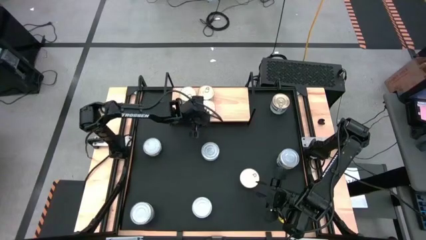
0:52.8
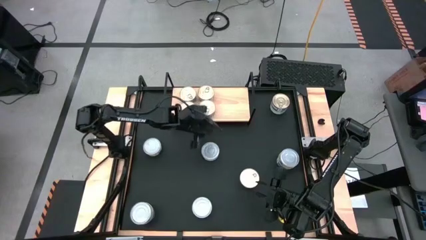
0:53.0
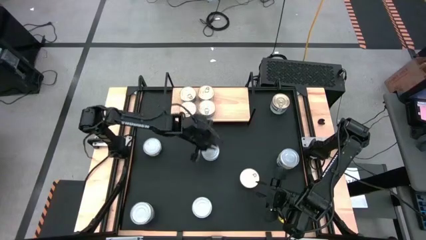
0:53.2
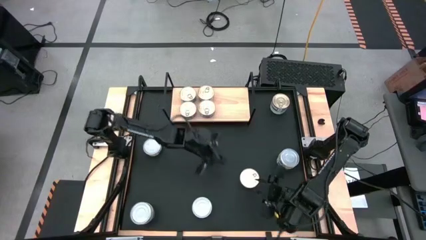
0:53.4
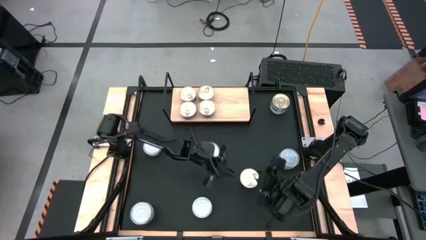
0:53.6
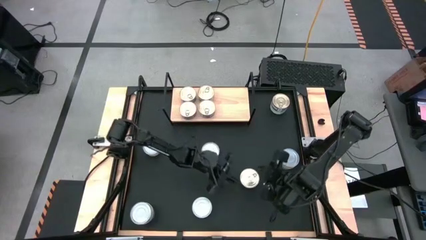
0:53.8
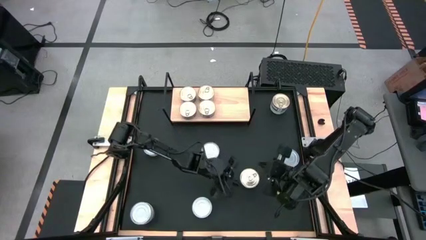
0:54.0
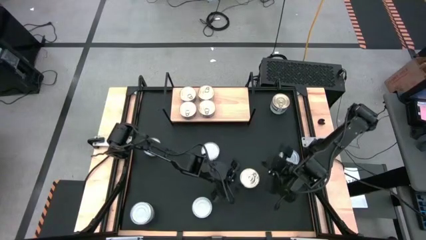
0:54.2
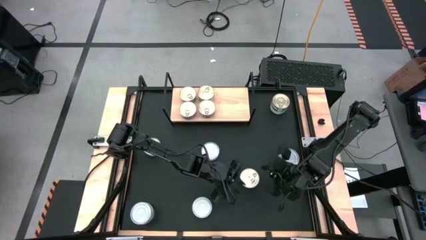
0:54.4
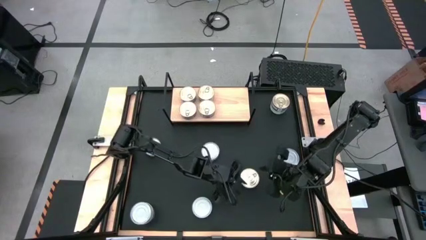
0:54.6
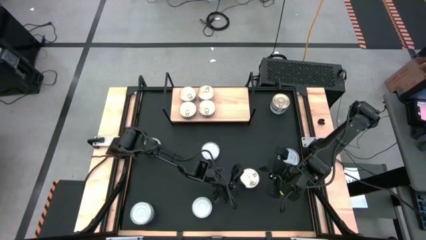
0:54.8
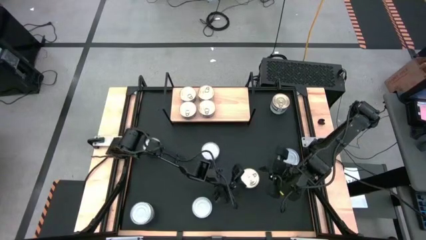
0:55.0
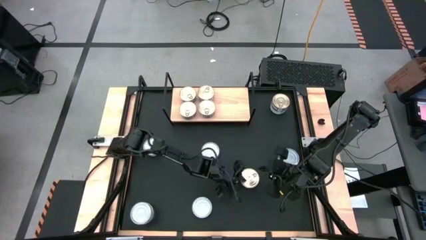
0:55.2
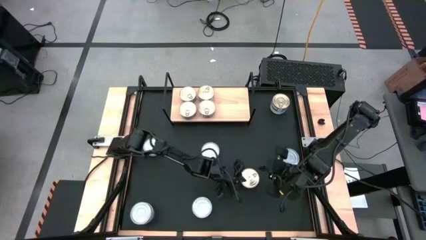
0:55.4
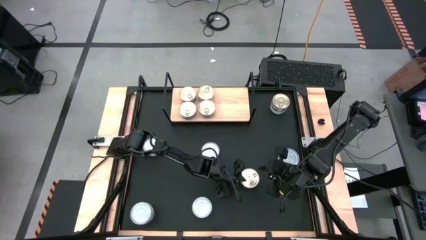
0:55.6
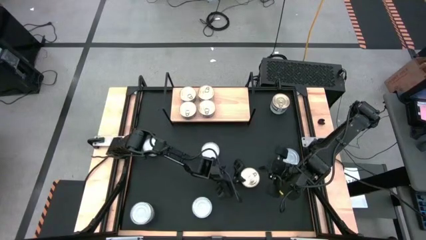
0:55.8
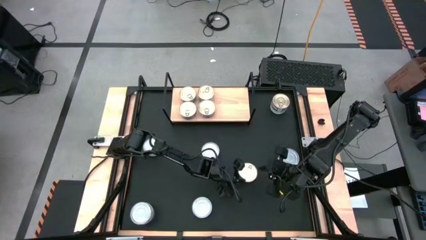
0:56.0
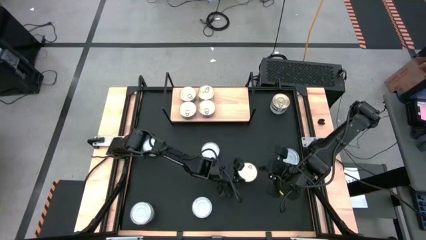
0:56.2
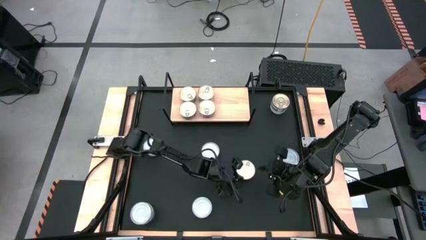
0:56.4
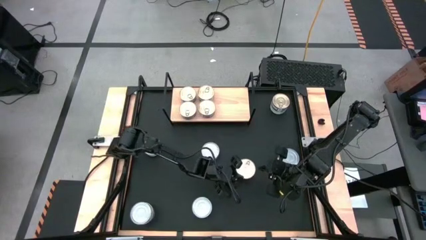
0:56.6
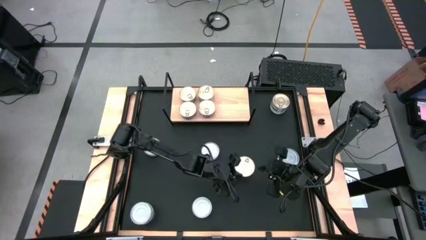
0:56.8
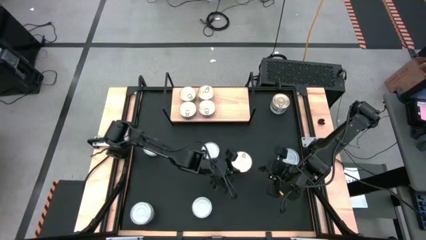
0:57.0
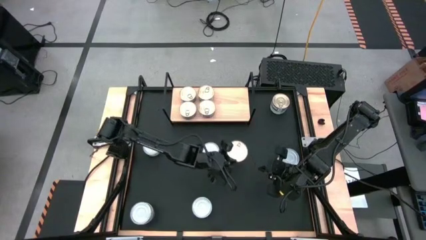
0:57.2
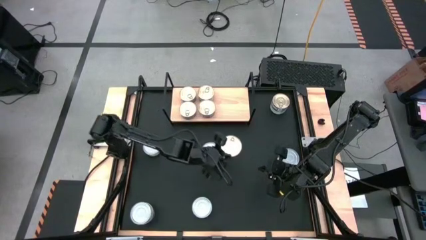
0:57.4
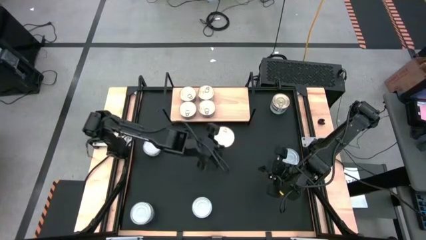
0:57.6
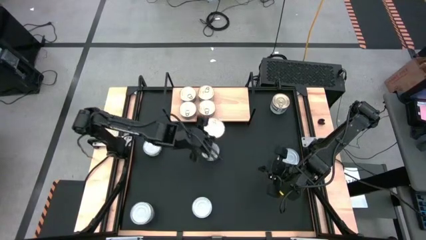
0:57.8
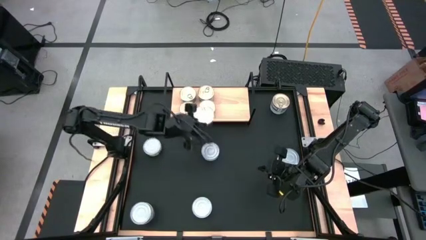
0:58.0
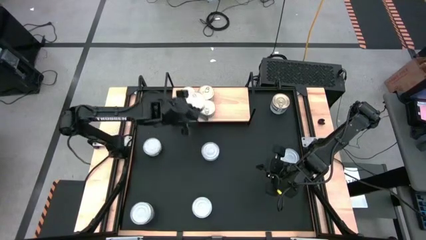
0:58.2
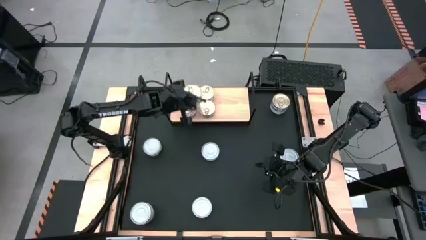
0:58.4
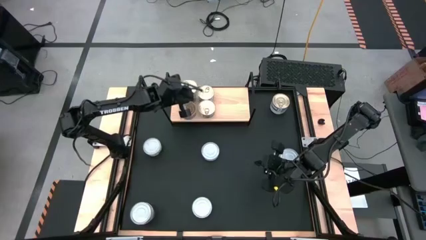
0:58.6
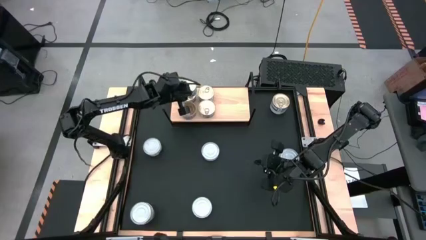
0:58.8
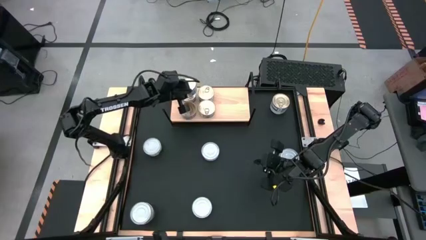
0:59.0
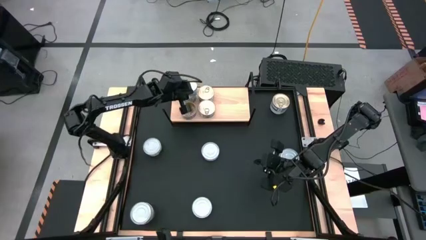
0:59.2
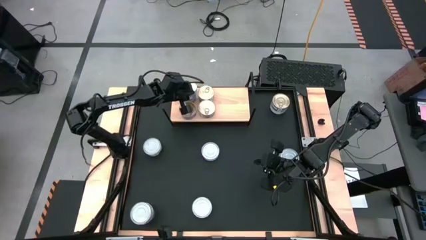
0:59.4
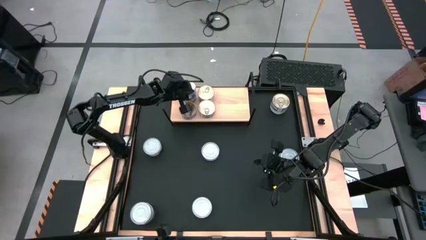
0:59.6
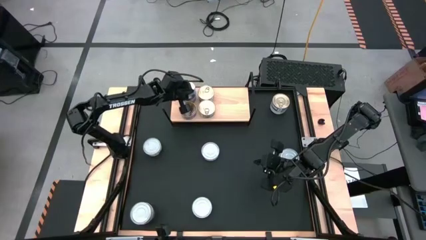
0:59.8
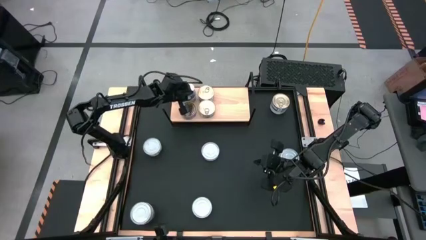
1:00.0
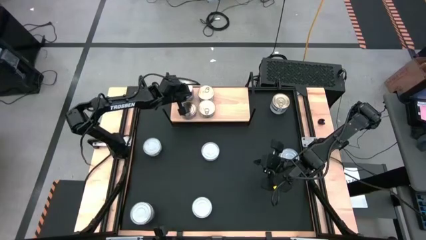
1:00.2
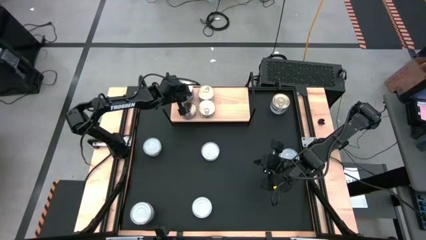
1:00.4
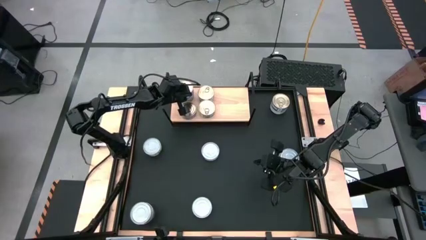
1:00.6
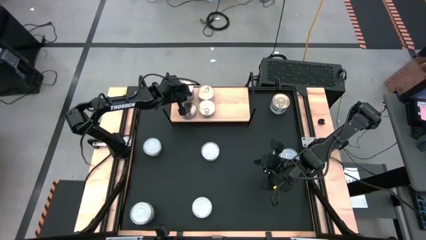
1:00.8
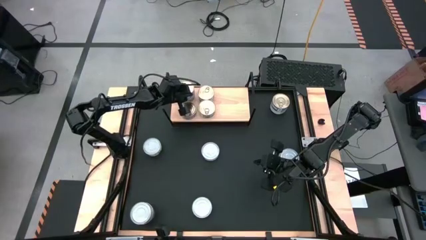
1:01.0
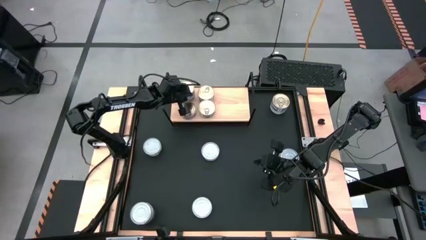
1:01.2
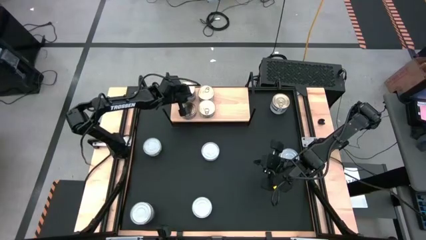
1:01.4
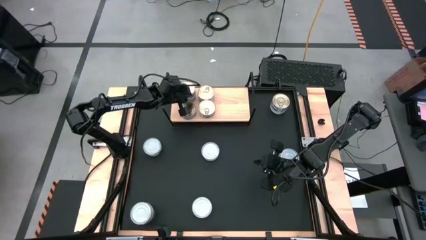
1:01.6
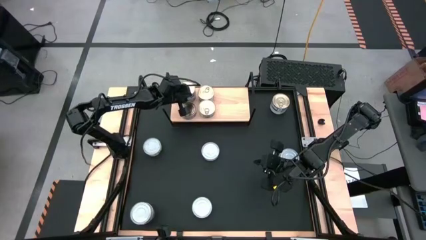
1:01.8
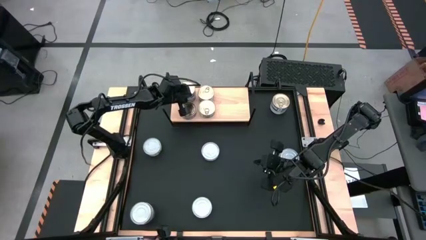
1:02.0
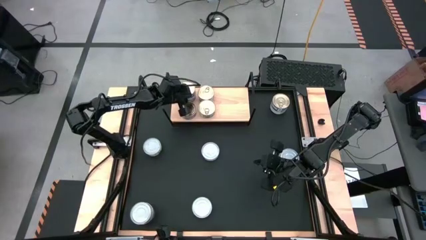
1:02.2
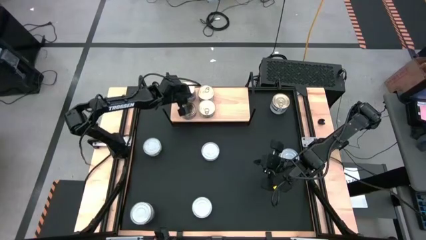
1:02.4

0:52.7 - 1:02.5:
Task: Stack canned seafood by type on shelf
Stack the blue tuna can on top of the blue tuna can on the shelf

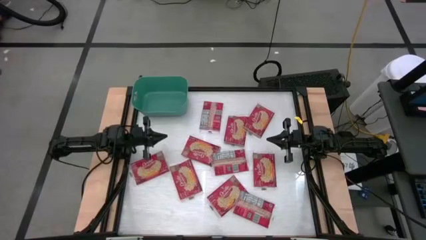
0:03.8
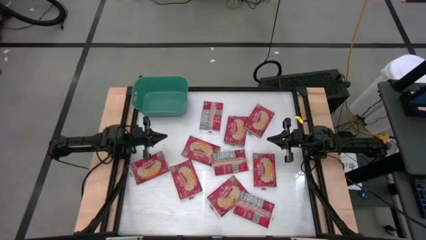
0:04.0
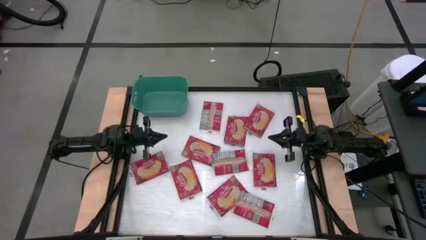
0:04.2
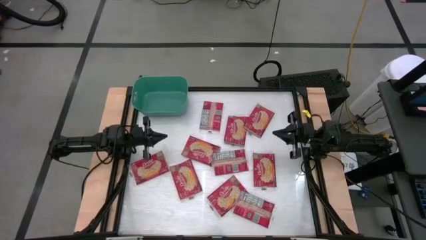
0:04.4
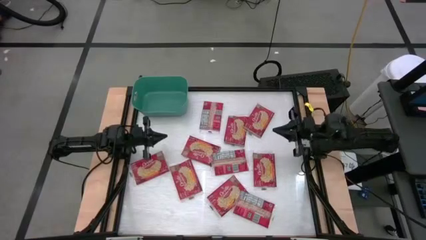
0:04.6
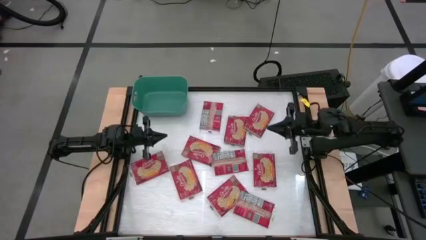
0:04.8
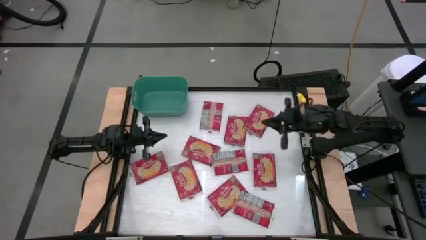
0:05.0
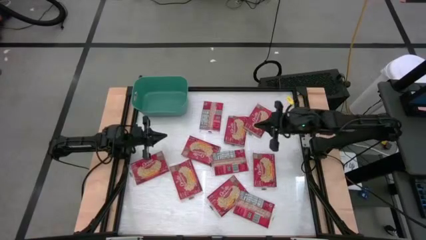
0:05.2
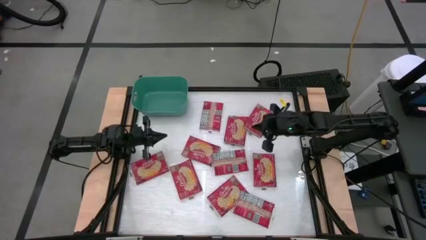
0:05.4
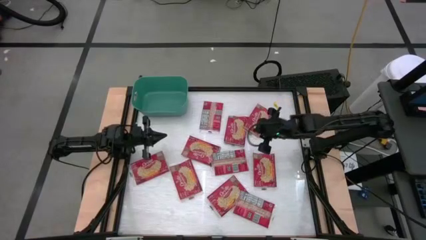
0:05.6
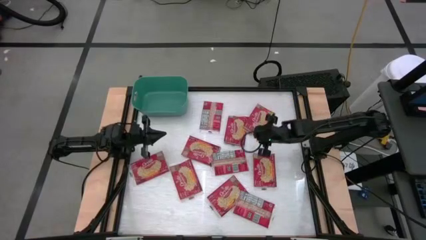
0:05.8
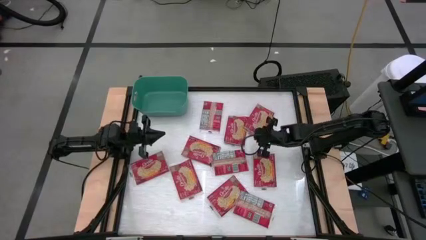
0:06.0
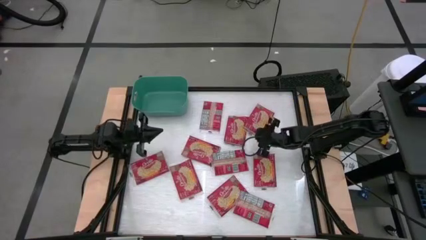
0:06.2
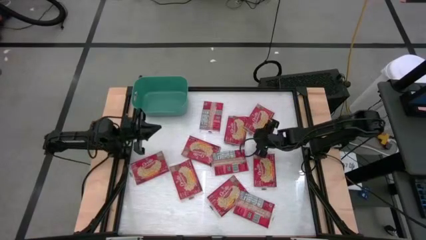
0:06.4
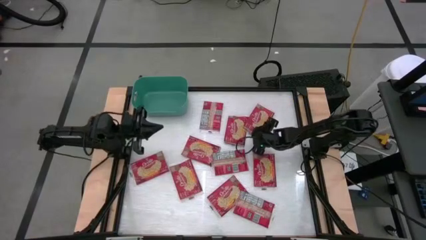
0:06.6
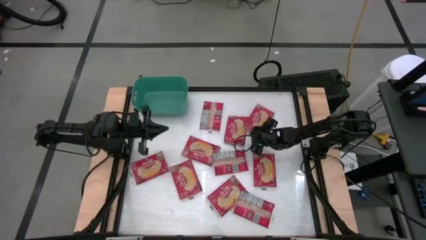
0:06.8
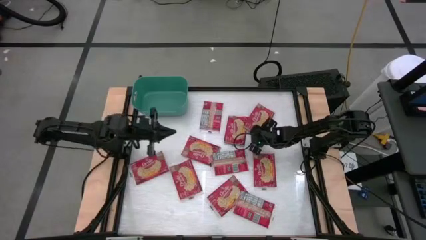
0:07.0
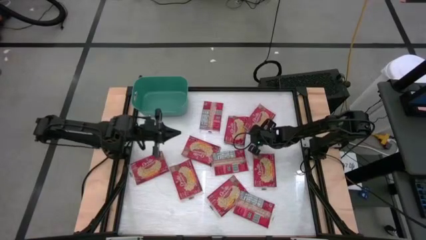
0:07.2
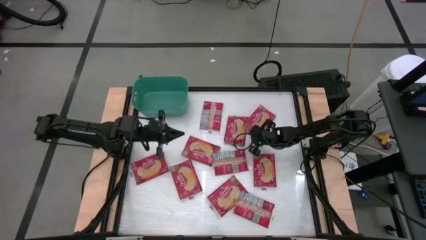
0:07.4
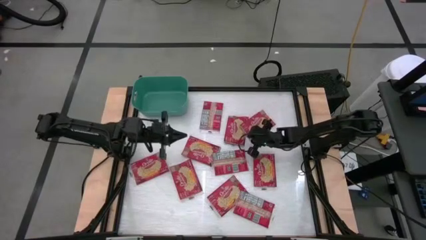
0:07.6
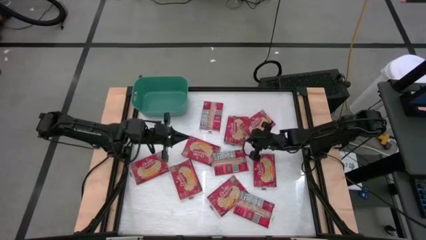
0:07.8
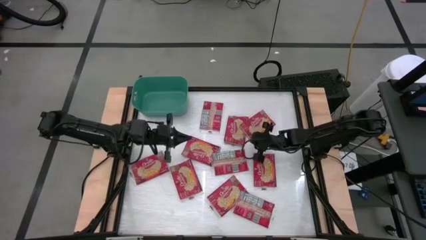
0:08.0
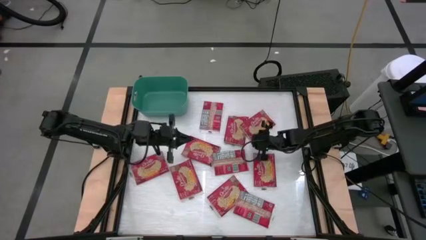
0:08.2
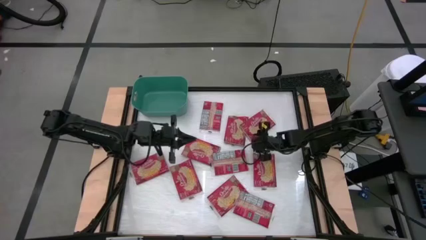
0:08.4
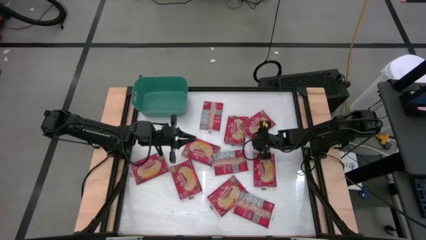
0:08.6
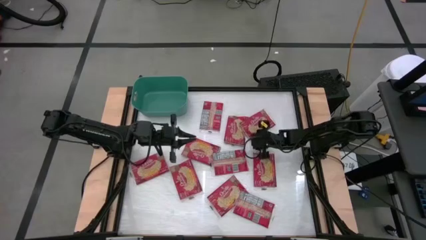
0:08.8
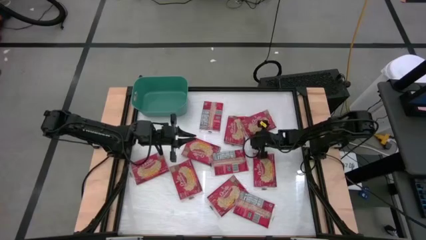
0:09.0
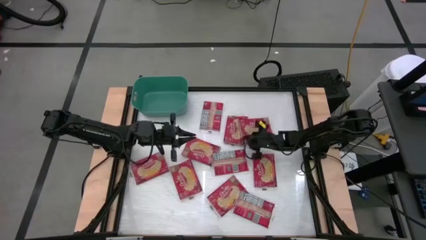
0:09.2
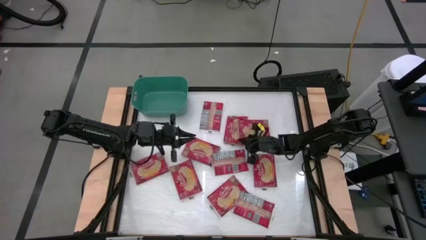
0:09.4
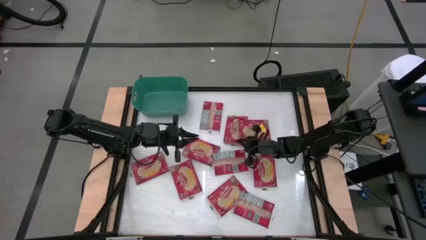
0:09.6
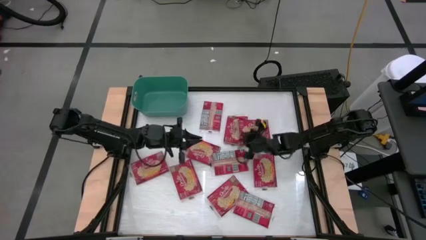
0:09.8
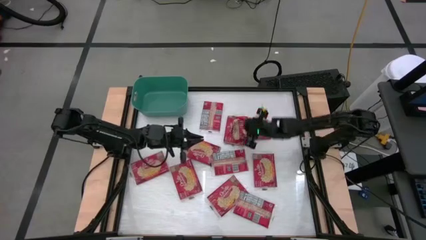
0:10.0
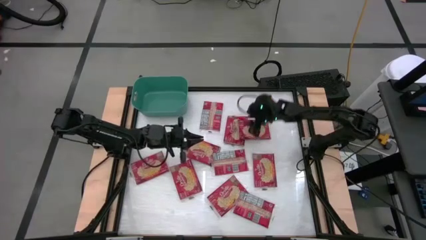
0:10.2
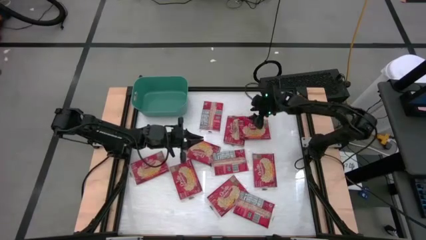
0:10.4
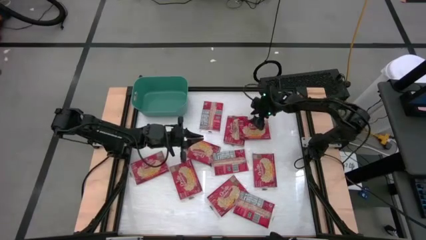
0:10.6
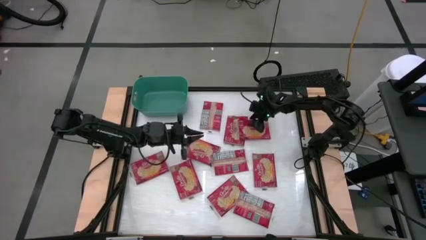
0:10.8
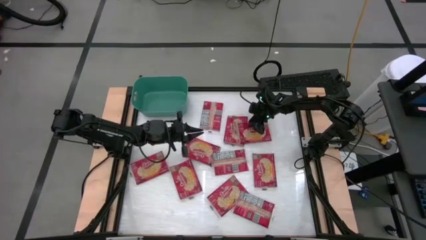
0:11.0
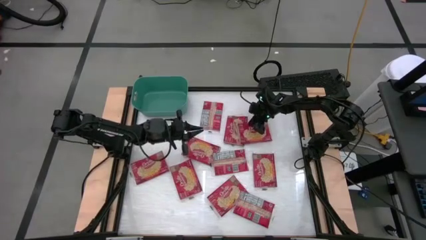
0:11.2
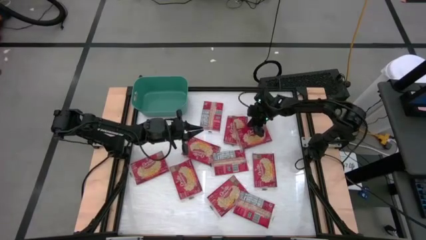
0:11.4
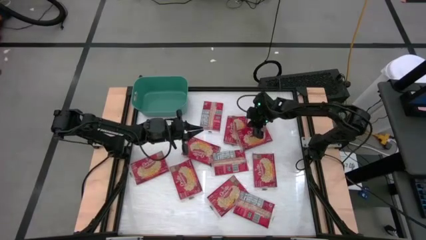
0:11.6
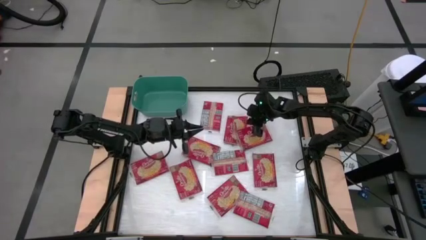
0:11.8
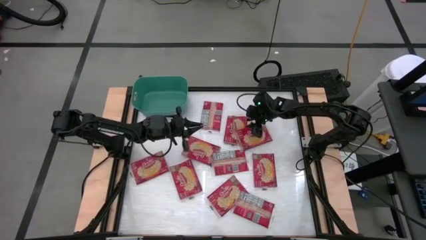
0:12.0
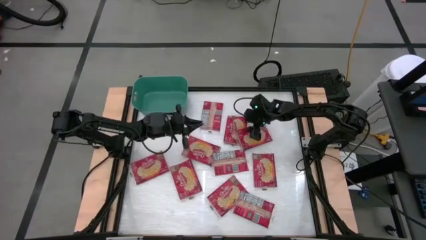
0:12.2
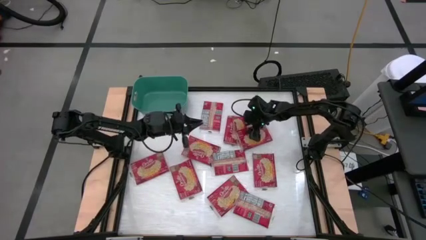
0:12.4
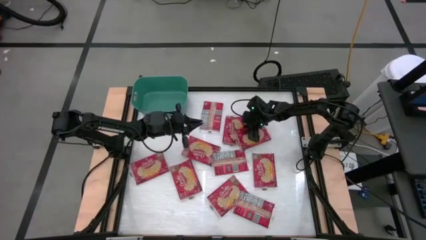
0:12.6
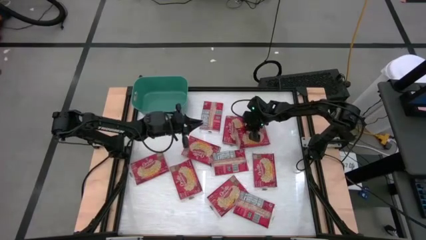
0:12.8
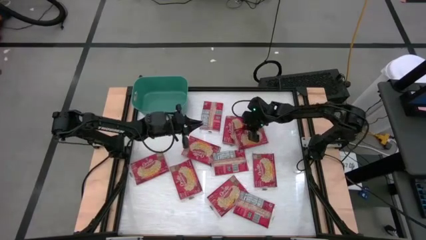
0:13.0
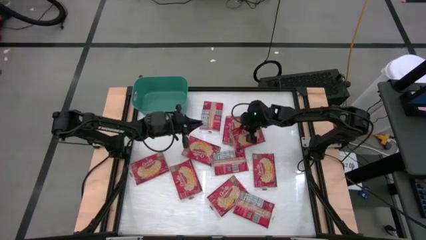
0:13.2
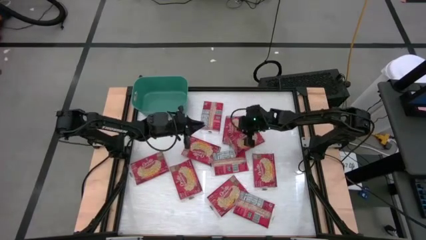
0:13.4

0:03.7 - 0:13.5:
Task: Sort popcorn bags into baskets
Put the red popcorn bag into the green bin
